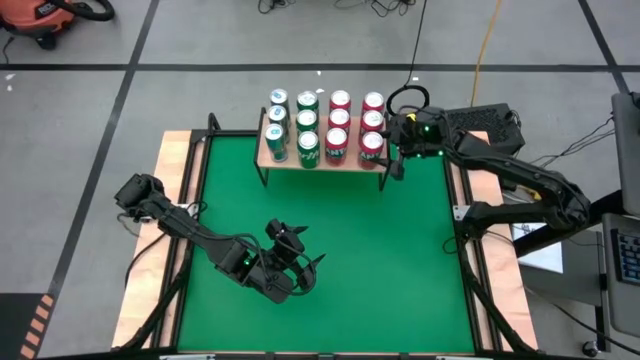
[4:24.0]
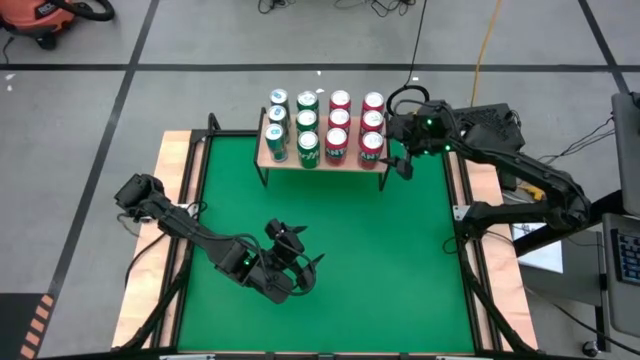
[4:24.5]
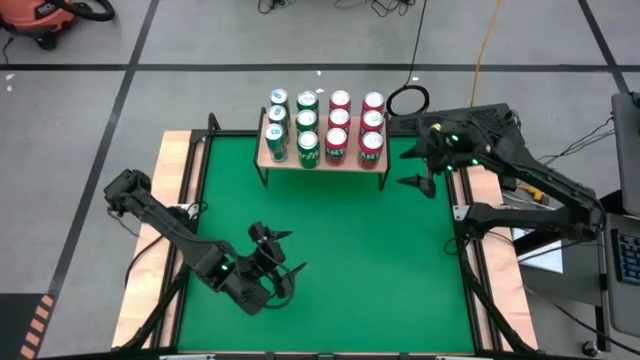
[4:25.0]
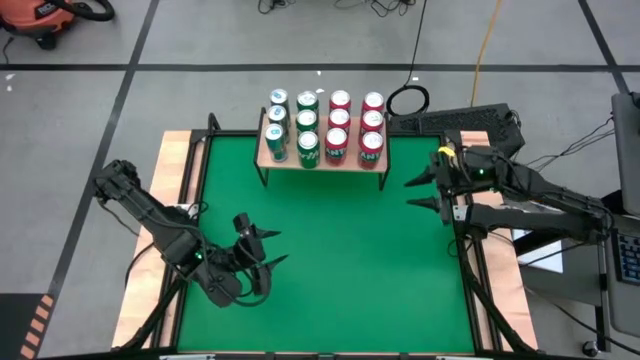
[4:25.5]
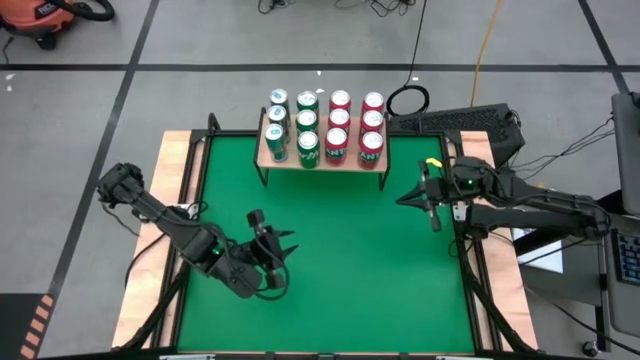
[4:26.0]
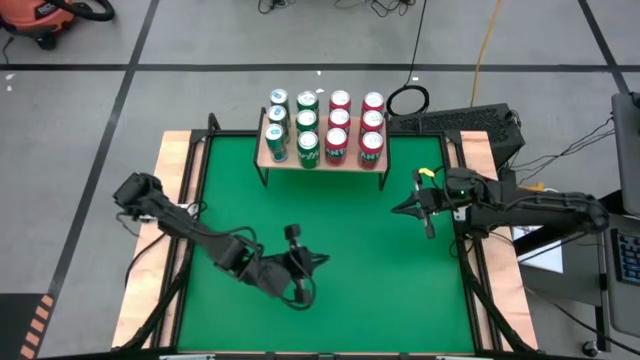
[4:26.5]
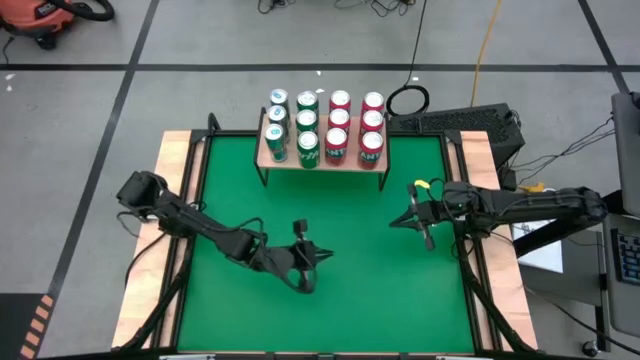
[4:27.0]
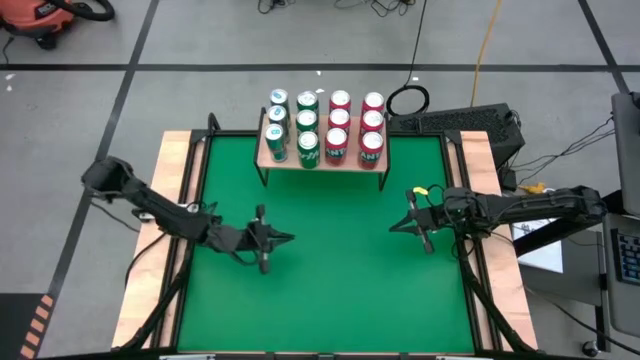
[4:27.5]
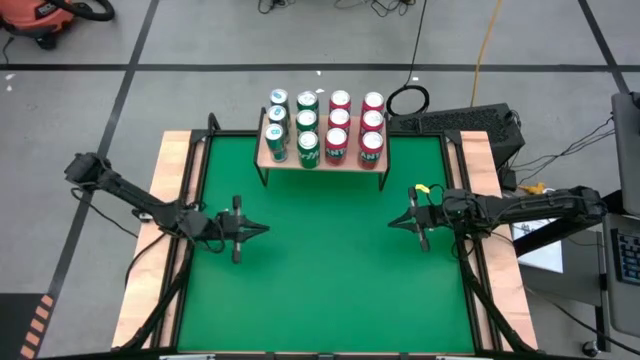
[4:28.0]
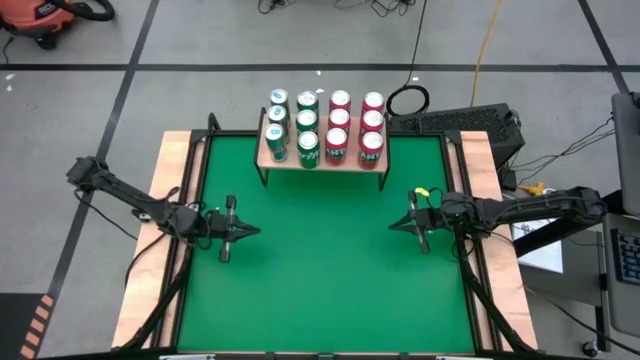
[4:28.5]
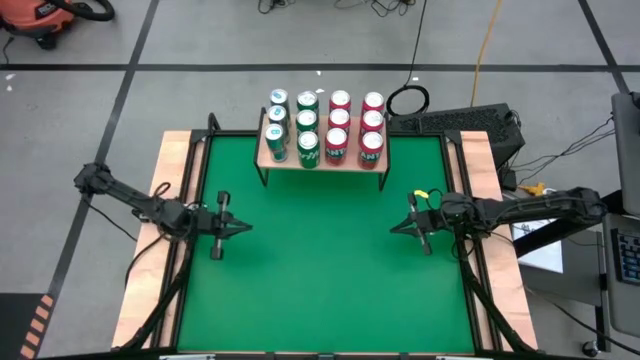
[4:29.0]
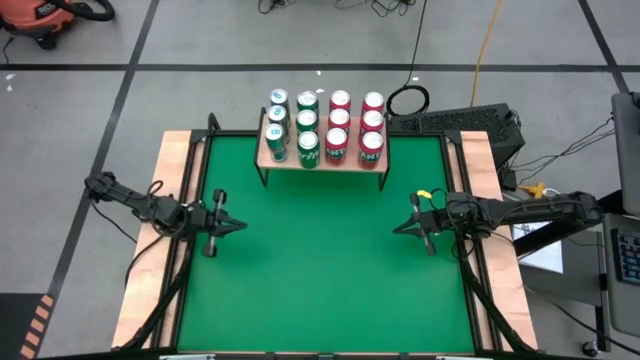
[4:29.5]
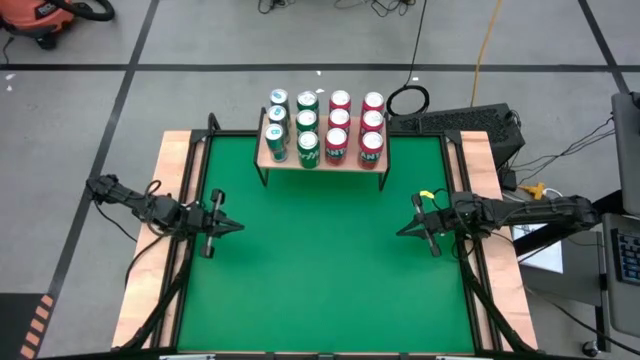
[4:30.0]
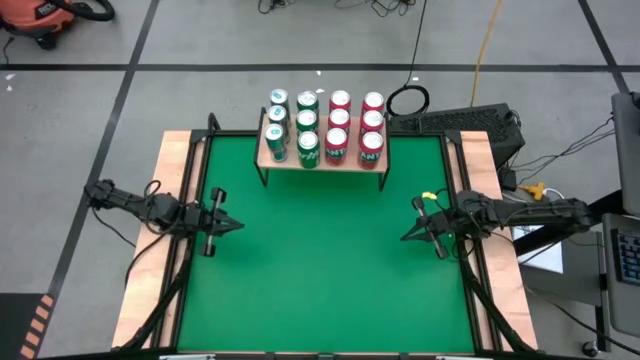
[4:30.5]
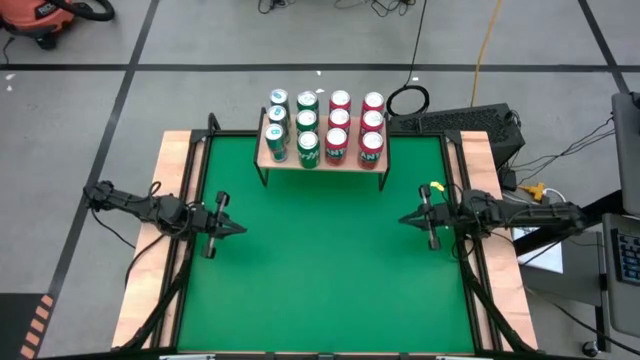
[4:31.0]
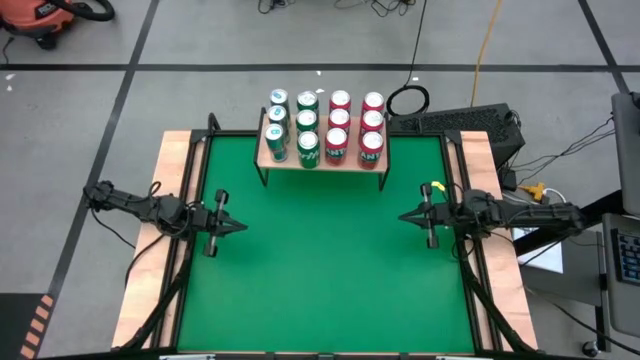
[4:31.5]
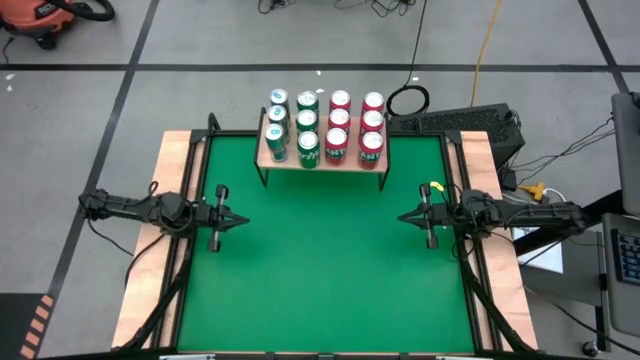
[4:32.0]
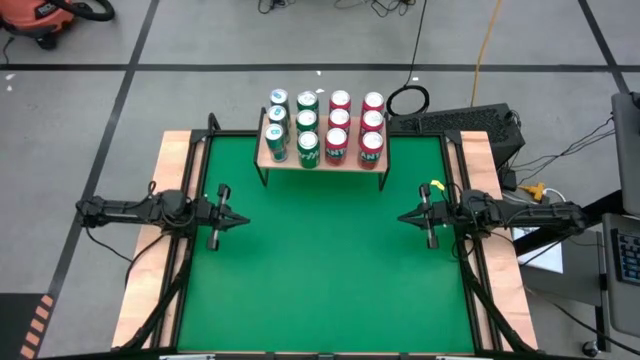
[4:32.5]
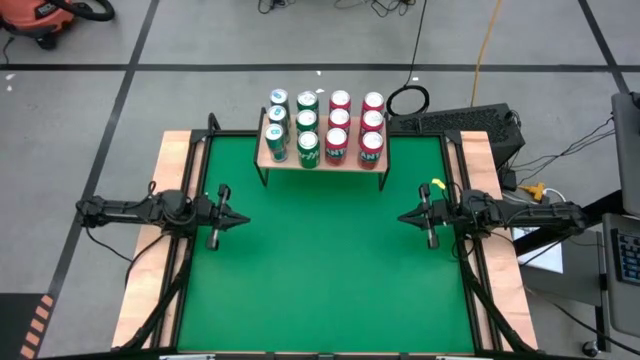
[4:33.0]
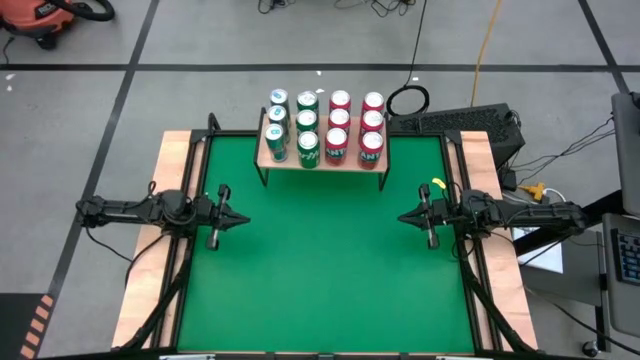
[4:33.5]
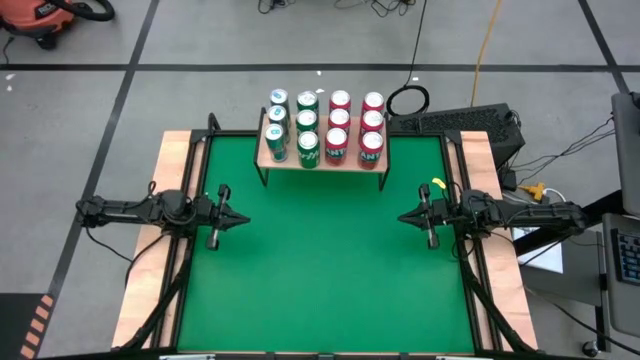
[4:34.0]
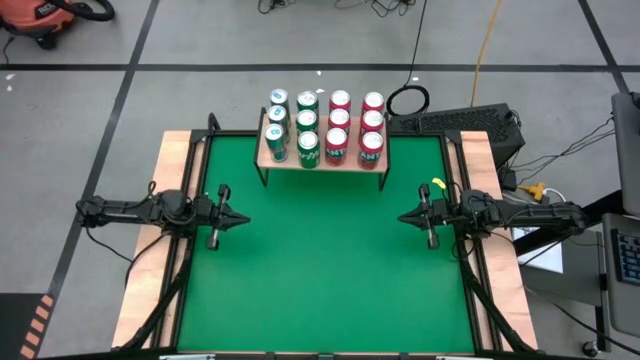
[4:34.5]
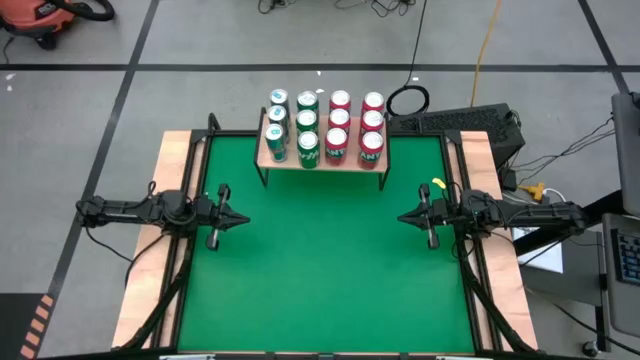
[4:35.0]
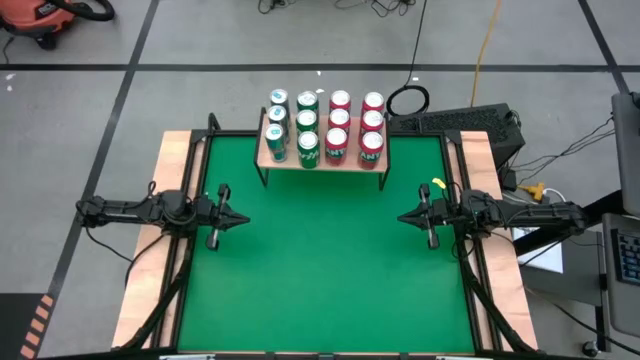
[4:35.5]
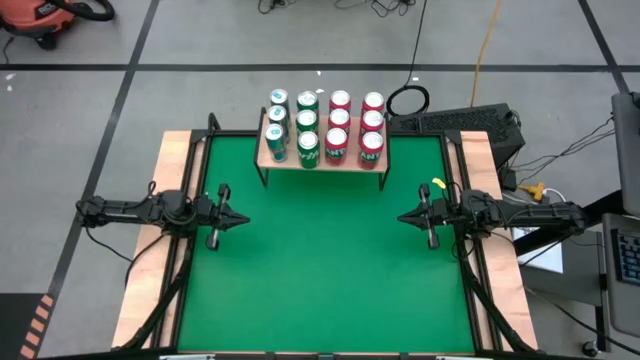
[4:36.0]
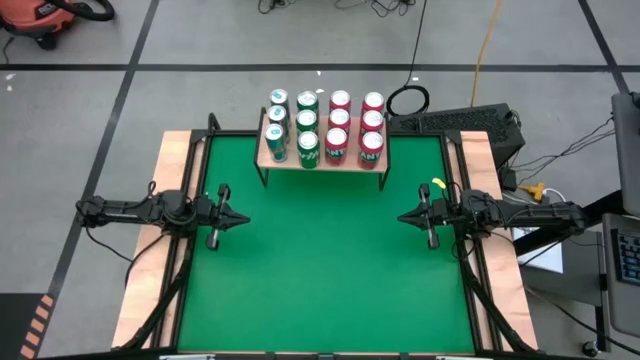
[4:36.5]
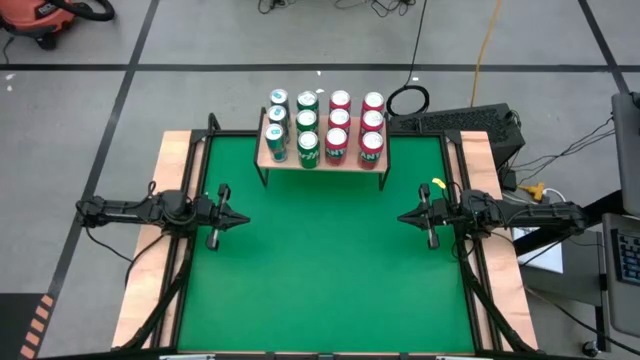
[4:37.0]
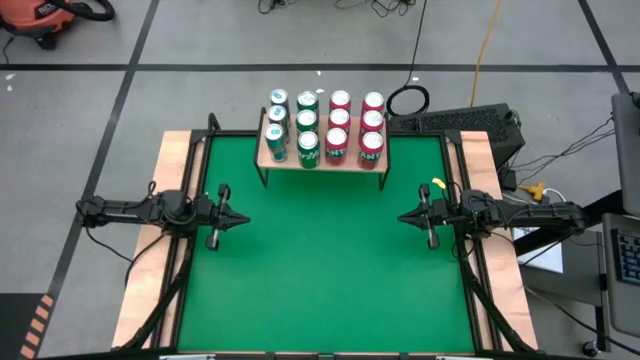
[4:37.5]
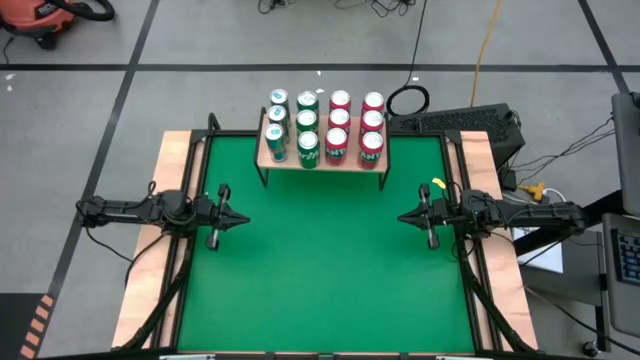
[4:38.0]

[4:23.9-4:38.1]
Task: Place canned beverage on shelf
Return to Home Position

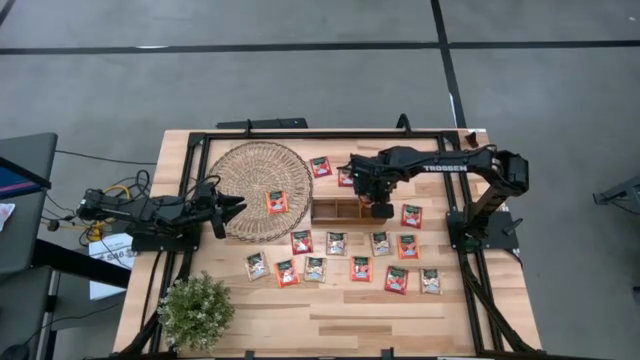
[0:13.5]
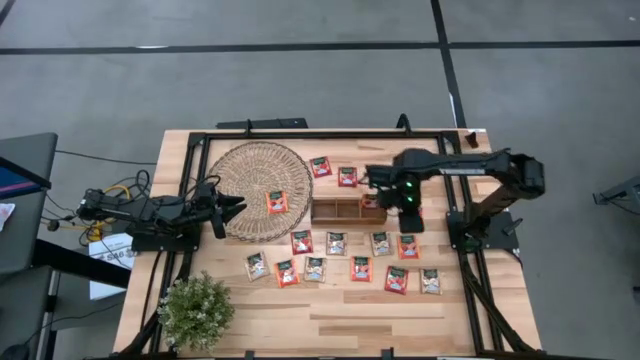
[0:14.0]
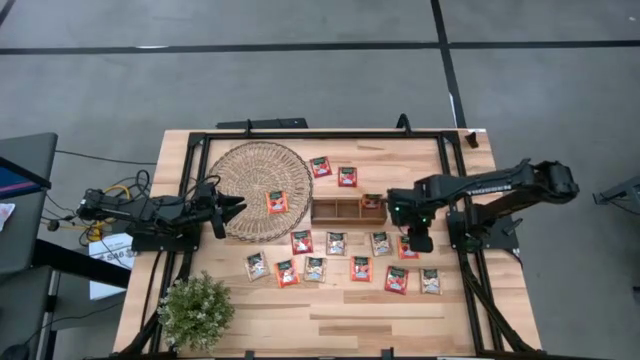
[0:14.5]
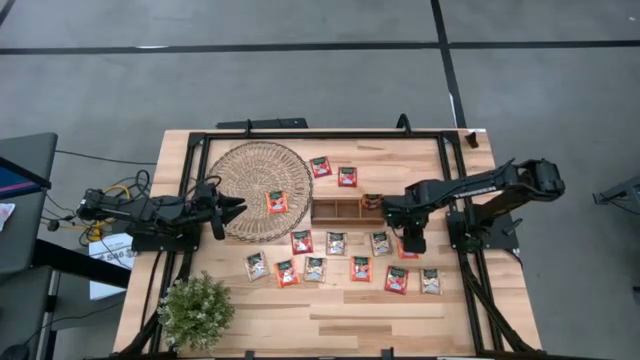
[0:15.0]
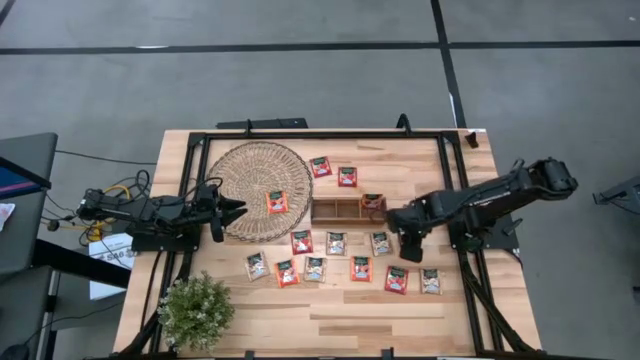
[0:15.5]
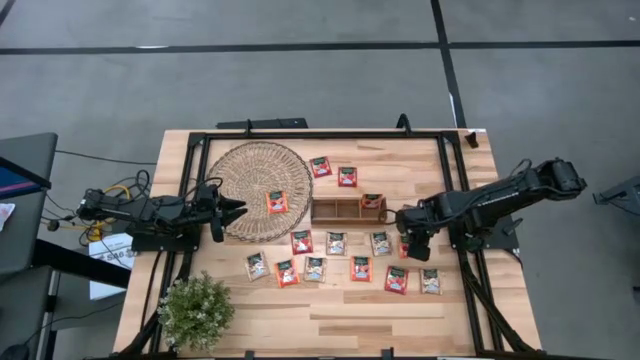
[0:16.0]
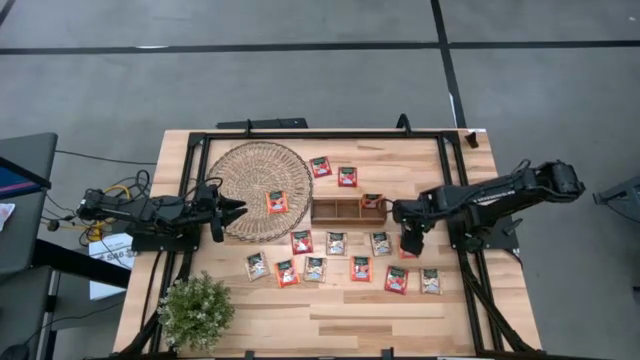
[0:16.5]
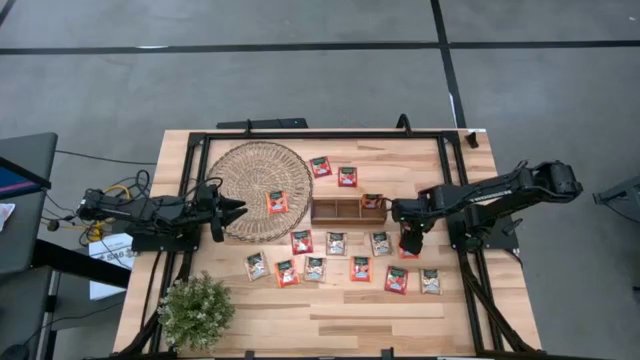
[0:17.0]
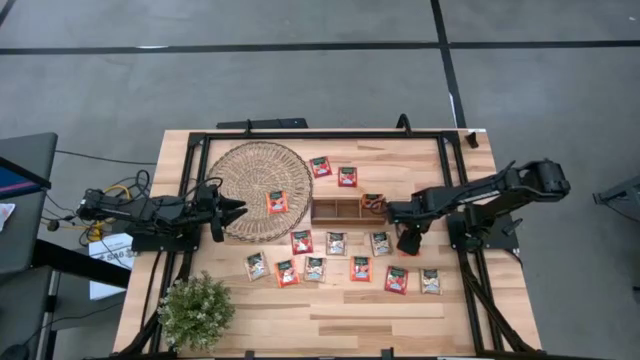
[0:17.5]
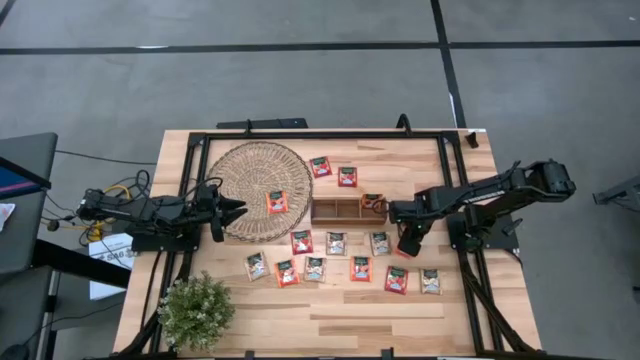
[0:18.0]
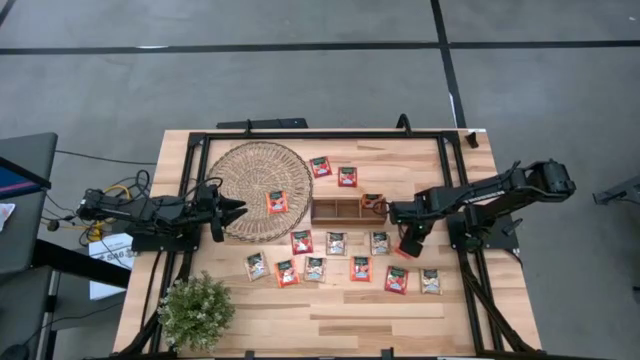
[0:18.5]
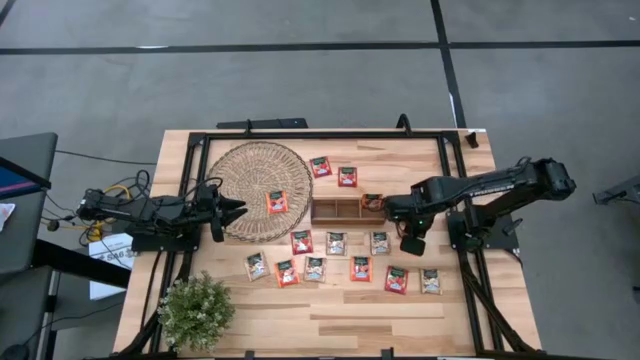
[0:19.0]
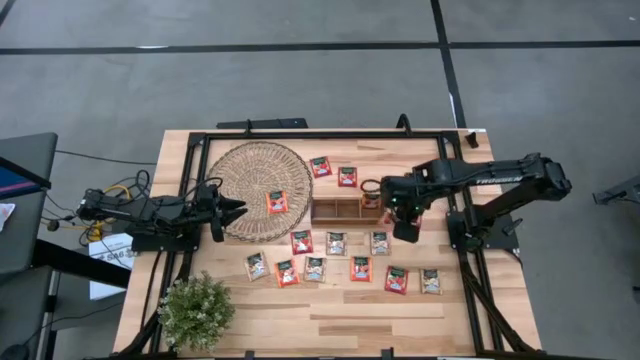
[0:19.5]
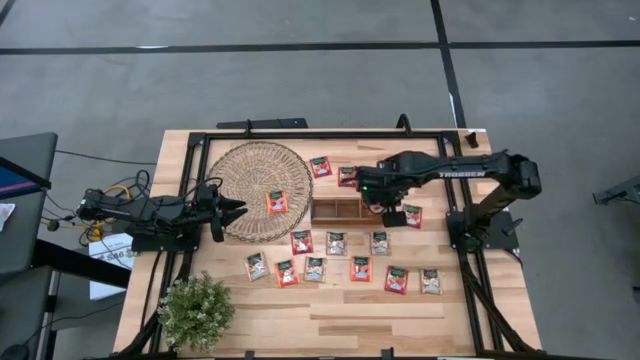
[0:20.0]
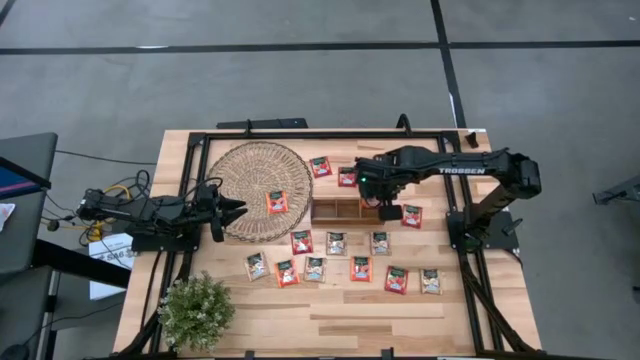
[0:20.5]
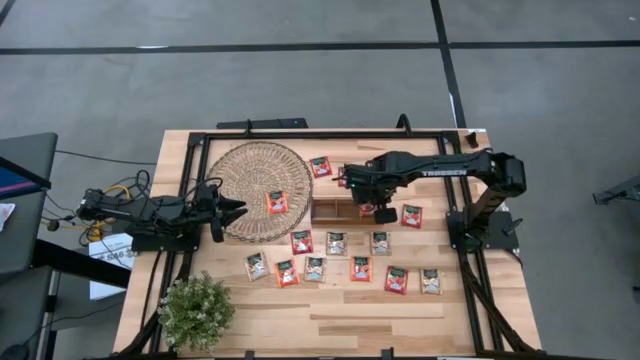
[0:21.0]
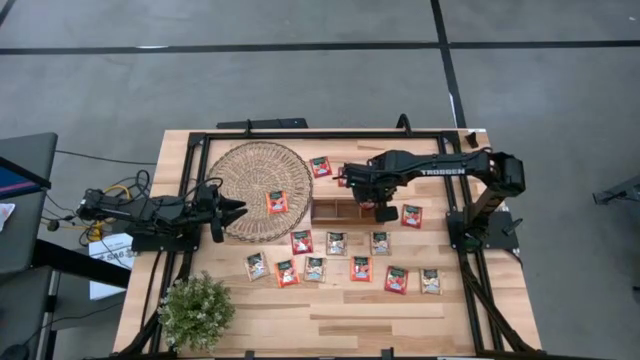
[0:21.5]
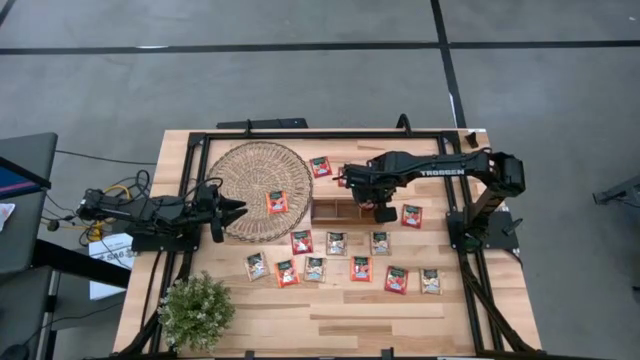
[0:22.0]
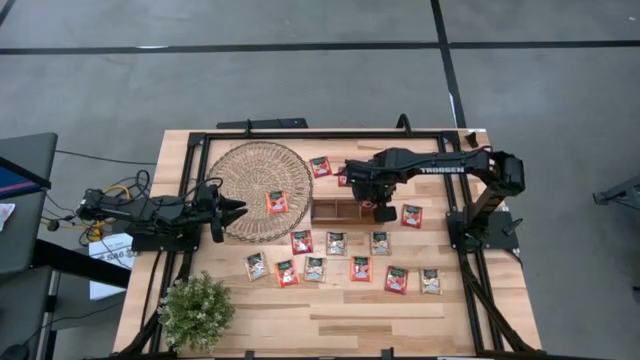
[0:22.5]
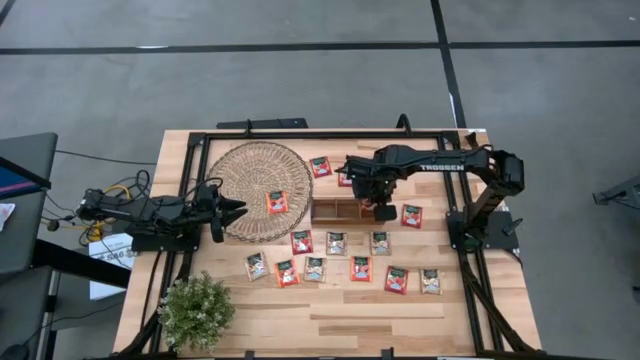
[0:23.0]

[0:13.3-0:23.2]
Task: Pick & Place Tea
Put the orange tea bag into the right section of the wooden organizer
